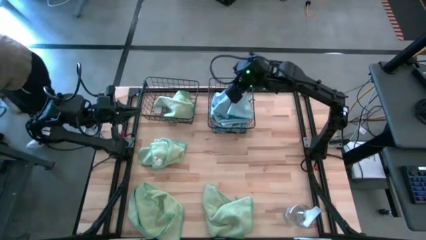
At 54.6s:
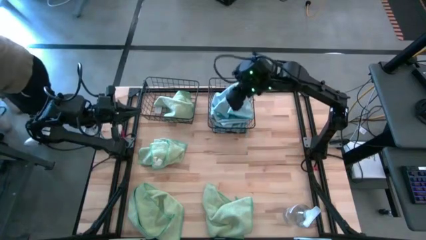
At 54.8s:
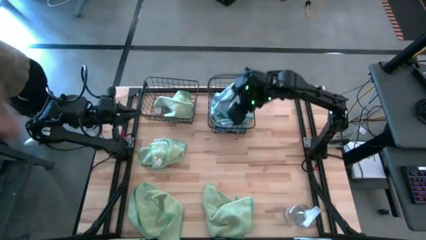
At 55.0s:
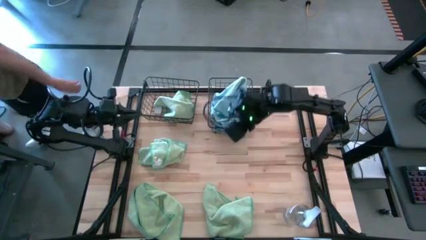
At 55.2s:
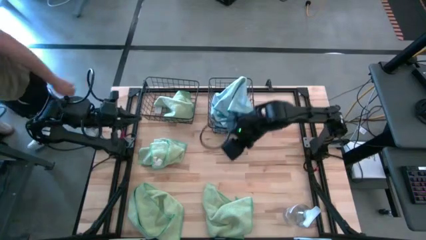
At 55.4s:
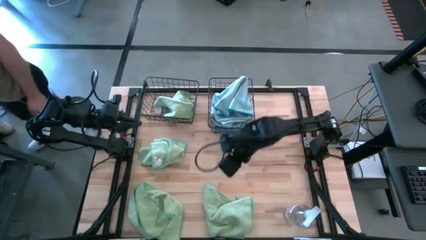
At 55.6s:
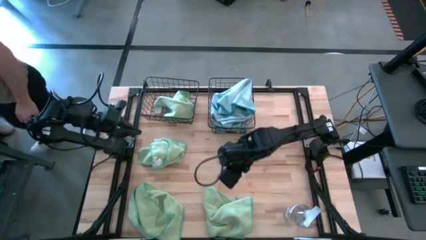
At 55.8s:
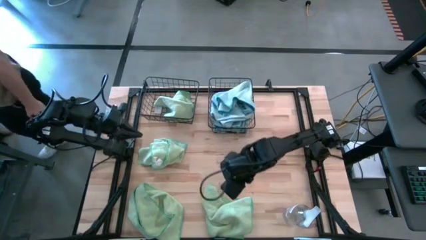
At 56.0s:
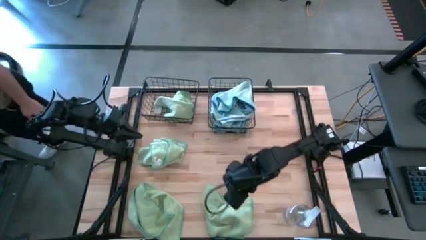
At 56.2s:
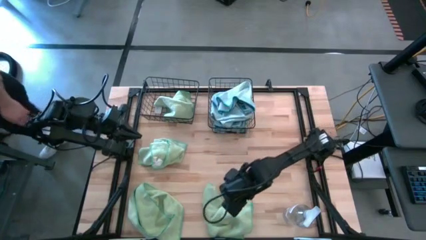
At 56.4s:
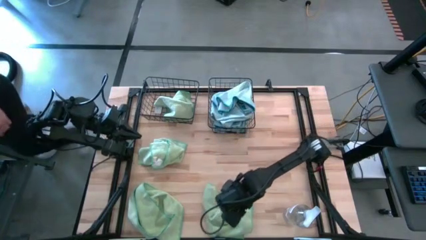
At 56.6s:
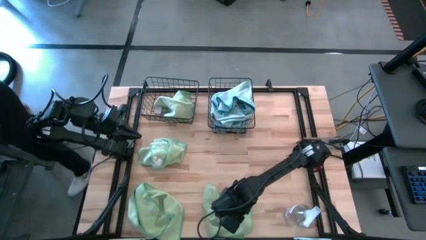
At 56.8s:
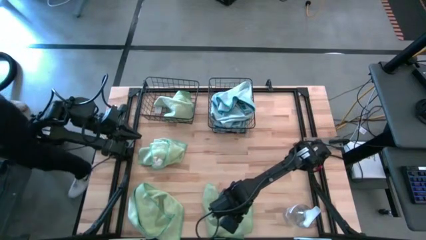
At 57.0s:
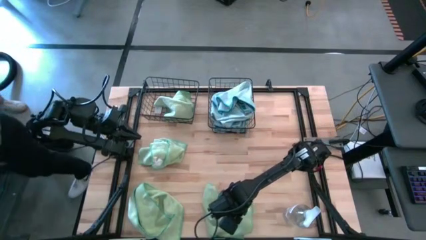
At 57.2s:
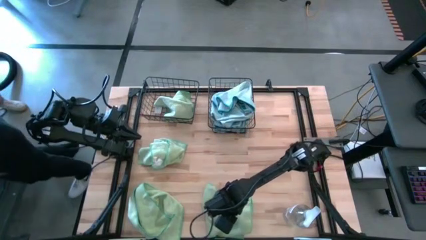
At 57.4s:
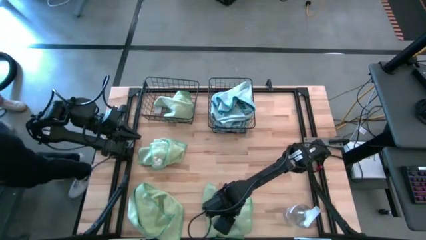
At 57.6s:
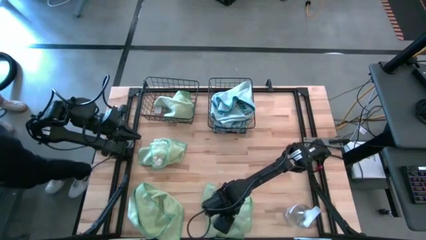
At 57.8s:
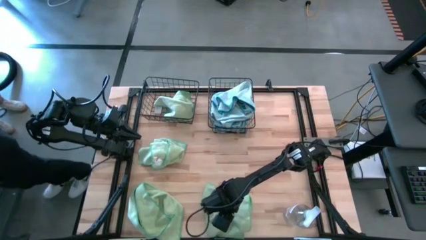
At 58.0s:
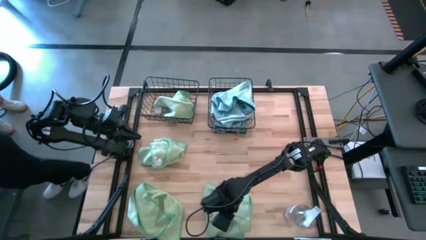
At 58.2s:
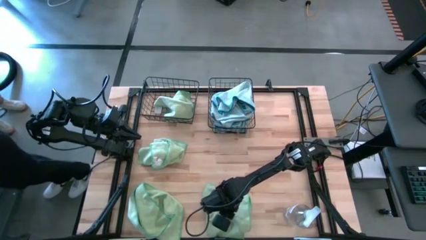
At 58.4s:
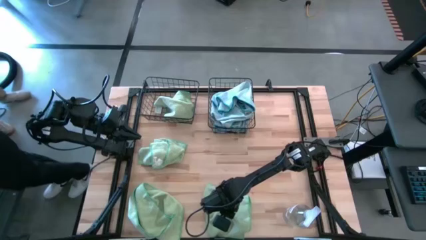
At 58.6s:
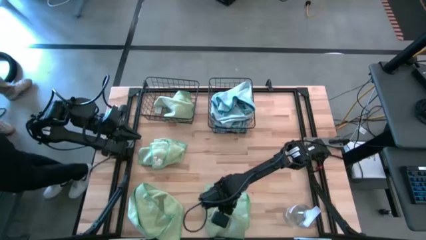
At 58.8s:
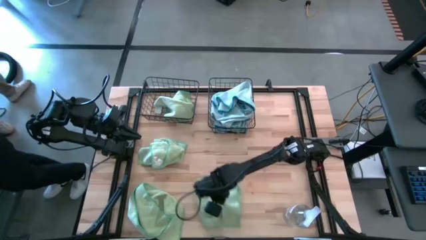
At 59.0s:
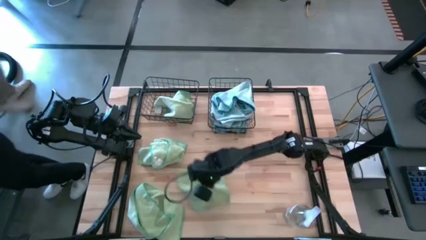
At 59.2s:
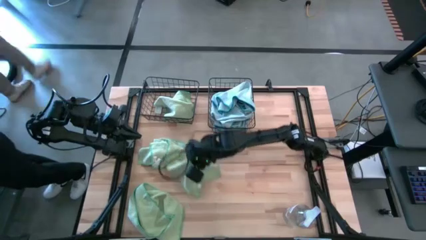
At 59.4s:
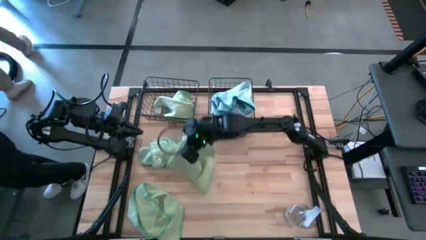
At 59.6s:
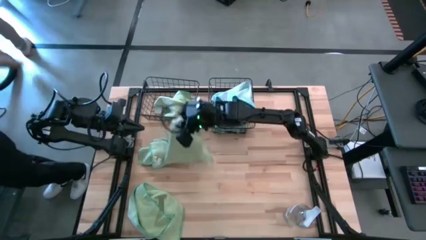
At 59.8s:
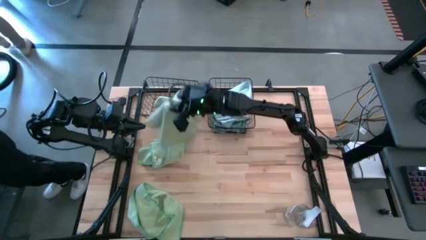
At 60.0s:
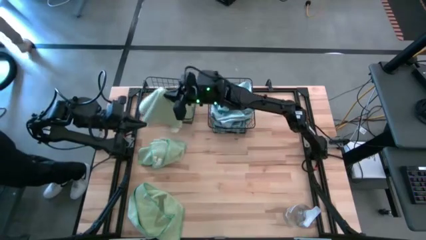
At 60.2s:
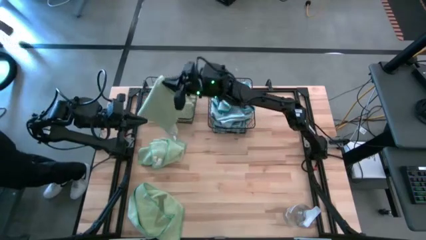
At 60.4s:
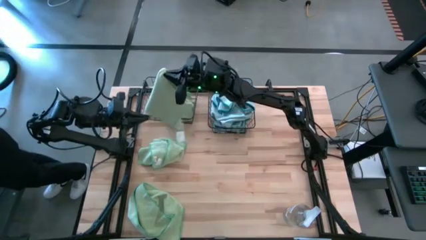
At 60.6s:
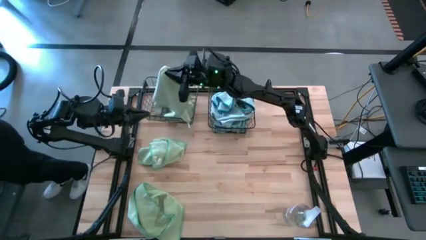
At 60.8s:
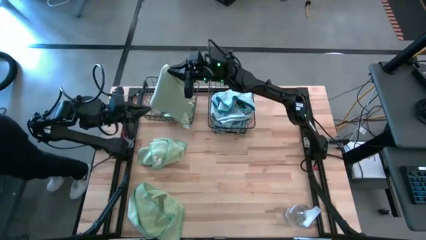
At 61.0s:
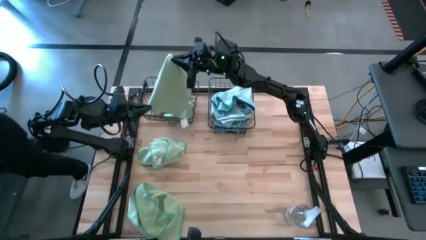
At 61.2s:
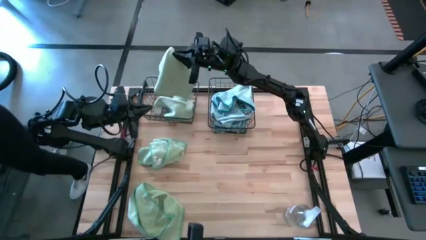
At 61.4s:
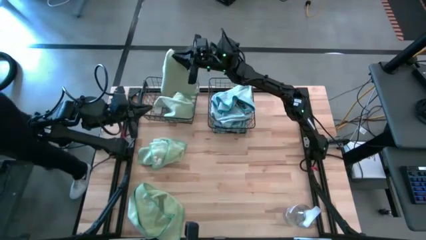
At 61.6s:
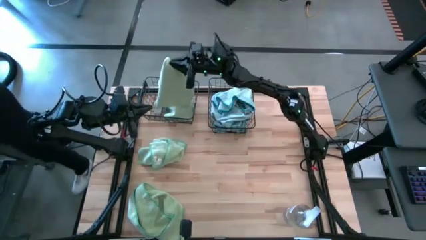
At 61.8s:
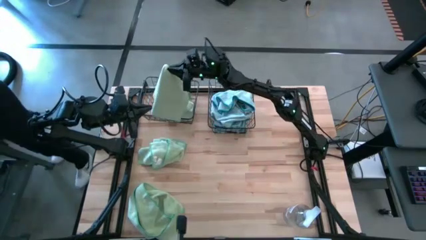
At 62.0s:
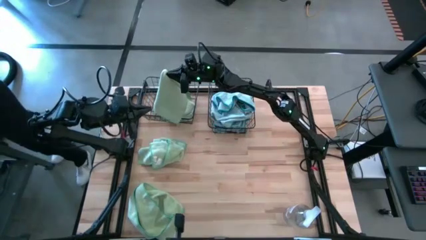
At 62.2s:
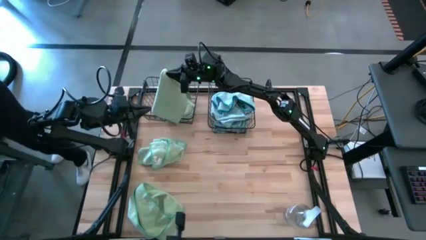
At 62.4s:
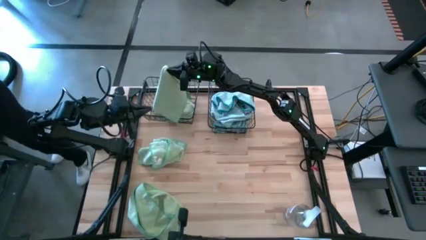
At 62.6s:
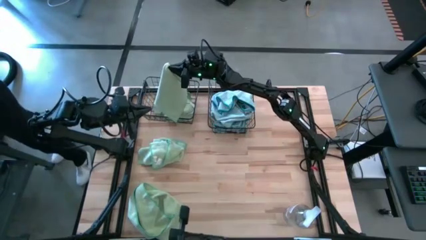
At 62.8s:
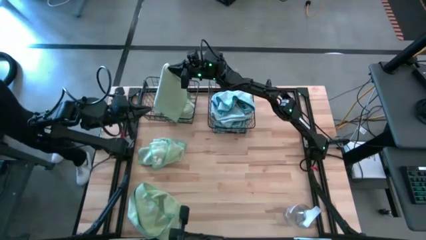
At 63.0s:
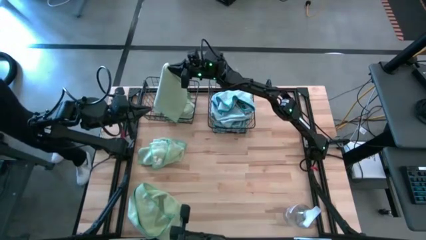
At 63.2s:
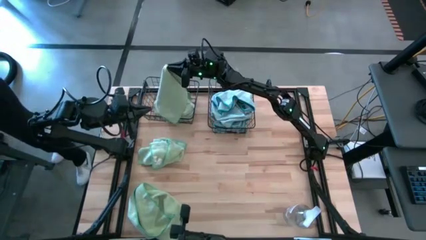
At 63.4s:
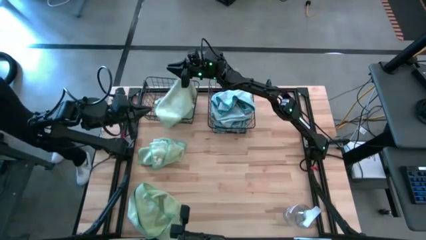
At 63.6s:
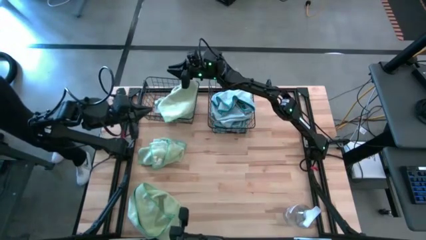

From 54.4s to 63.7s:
Task: Sort microfiber towel by color & place in baskets
Put the green towel into the left wire basket

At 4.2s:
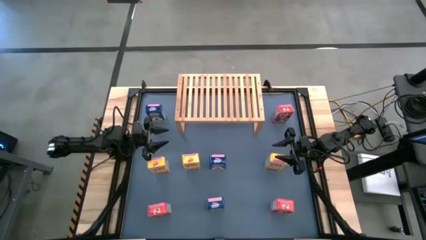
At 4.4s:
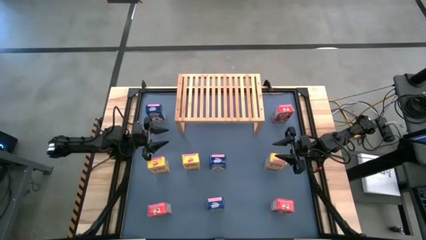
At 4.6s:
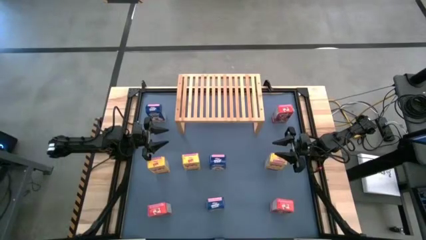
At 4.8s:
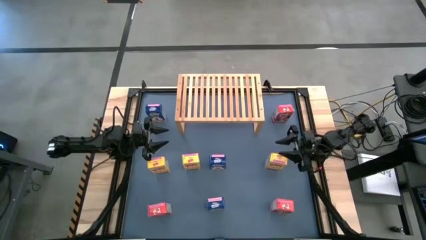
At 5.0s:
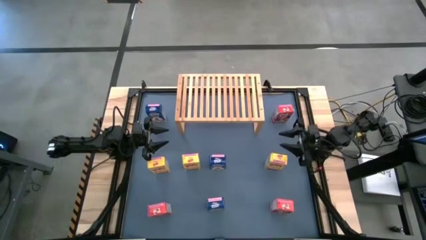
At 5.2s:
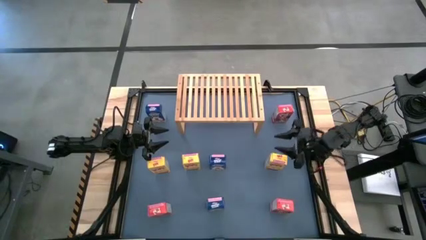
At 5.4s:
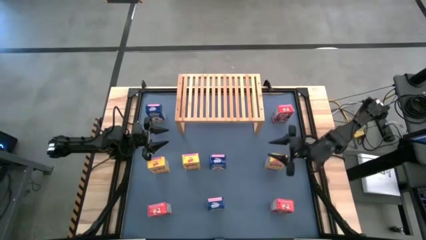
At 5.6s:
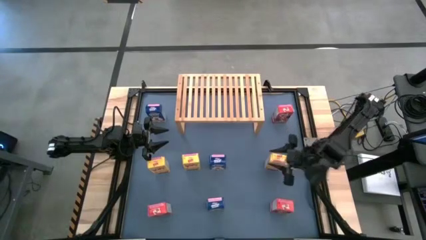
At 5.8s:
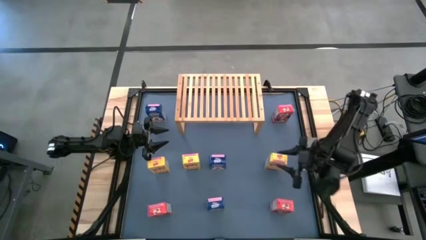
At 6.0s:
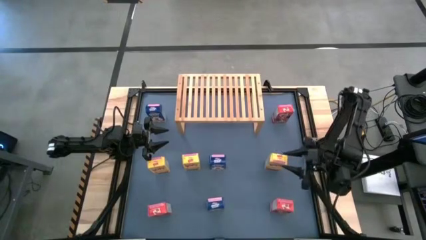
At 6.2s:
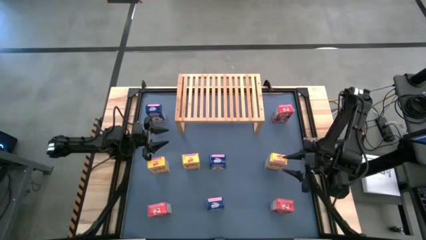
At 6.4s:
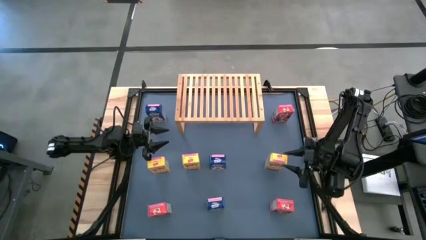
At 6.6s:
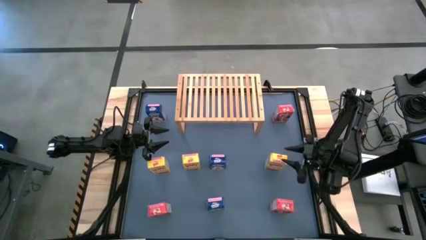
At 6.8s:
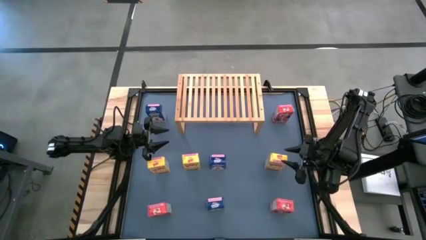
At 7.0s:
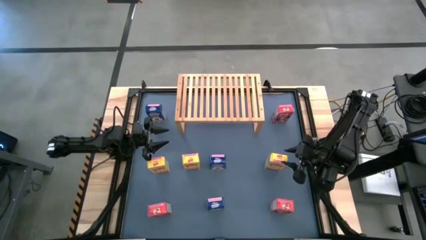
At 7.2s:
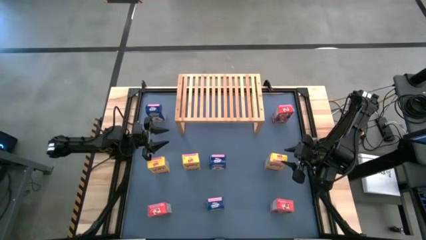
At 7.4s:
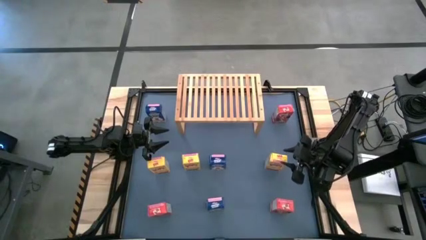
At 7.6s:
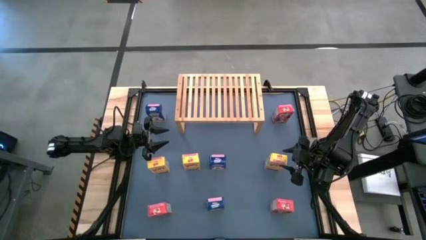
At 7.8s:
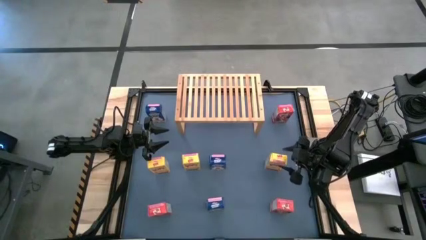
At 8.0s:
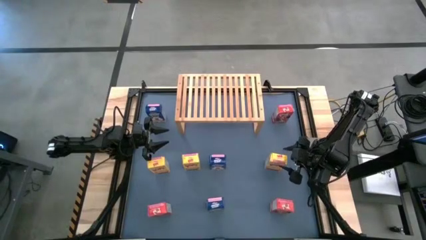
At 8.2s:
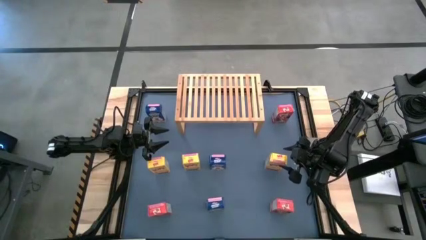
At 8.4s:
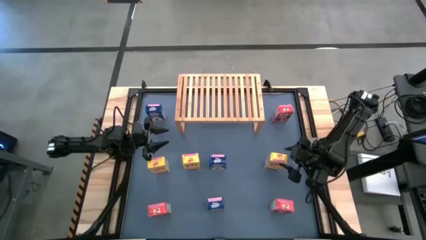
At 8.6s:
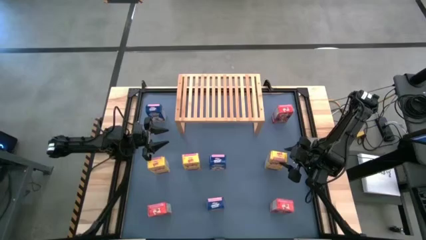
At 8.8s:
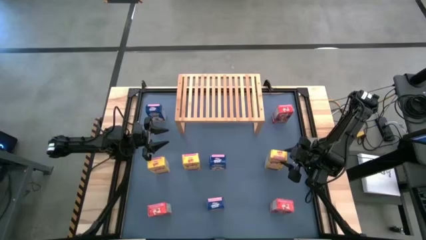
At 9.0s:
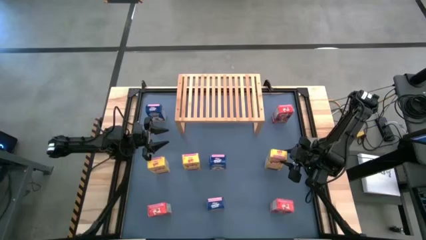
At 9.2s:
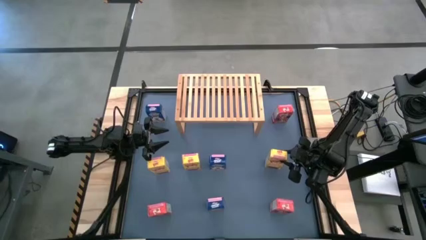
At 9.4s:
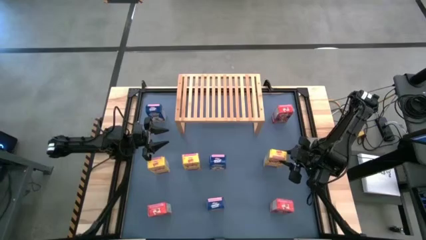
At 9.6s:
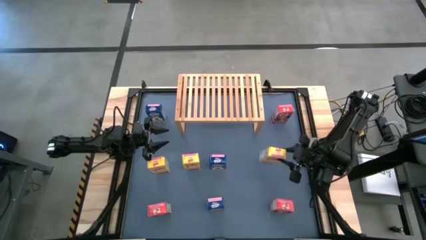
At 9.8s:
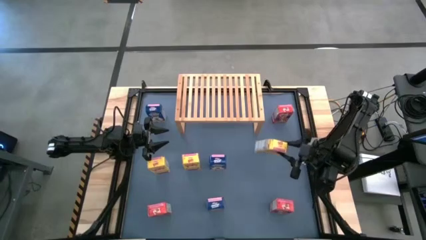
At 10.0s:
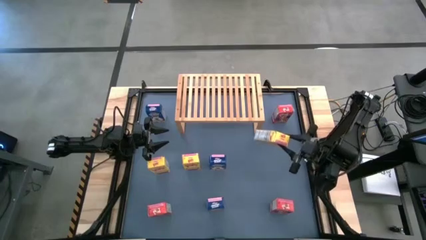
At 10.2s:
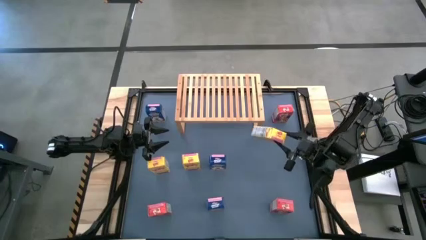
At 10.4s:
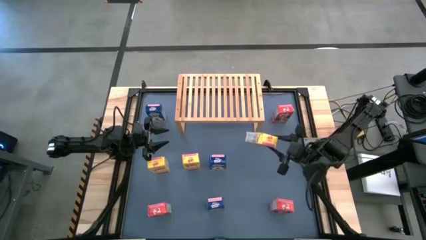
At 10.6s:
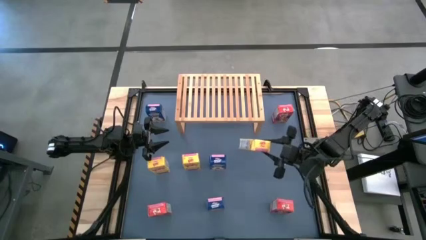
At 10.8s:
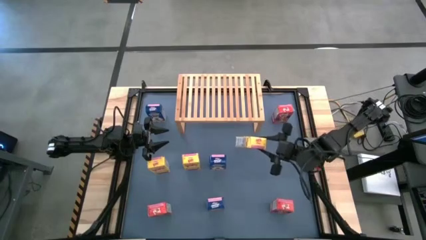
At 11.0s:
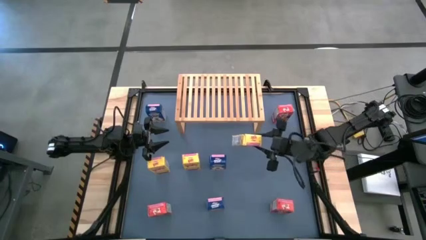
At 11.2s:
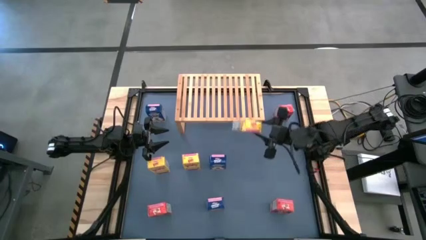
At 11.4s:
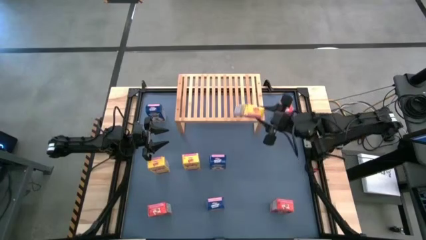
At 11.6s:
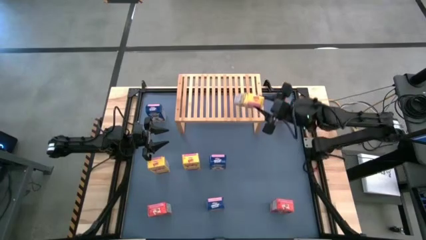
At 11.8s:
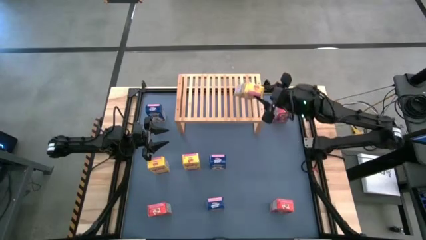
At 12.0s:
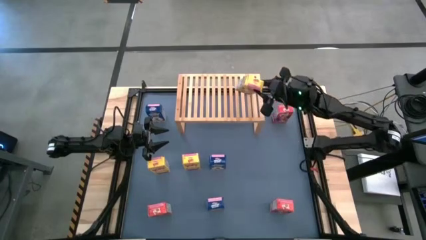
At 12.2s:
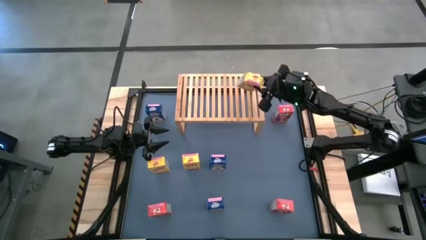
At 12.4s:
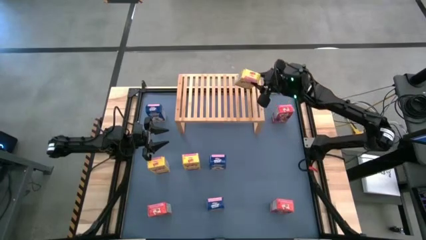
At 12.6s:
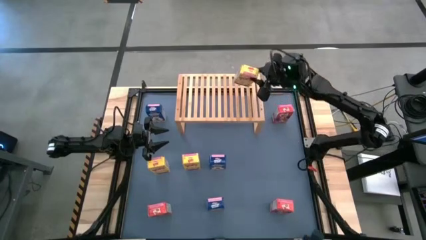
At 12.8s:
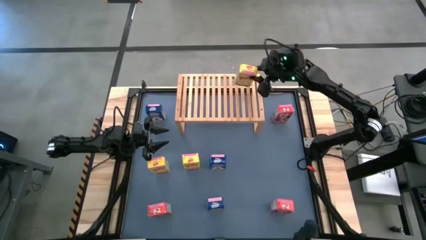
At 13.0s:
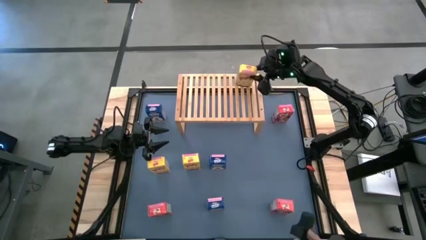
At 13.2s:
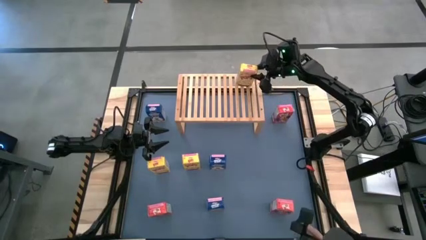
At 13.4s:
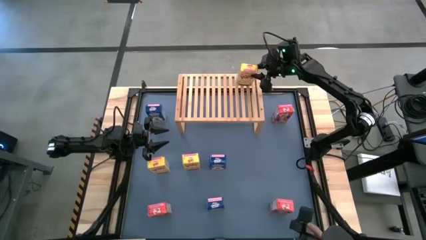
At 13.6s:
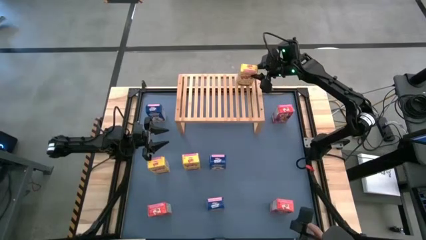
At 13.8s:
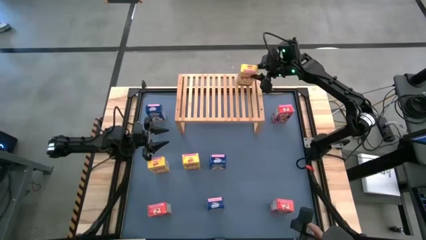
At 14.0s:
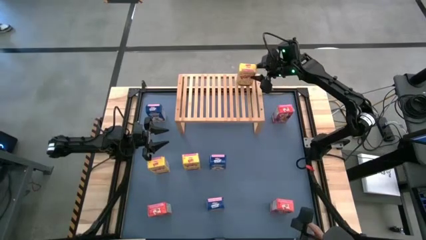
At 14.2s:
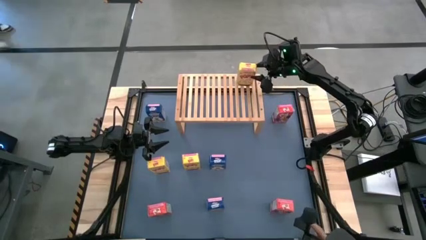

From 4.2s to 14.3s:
Task: Stack cereal on shelf
Put the right yellow cereal box on the shelf
